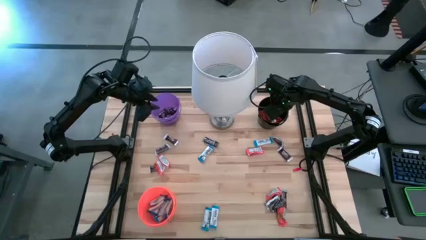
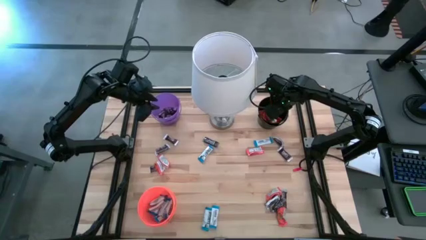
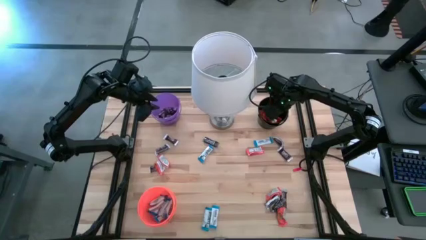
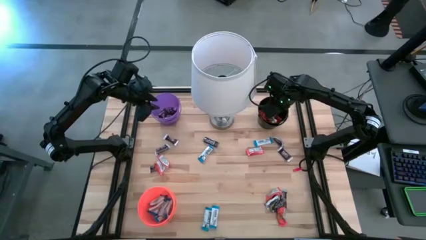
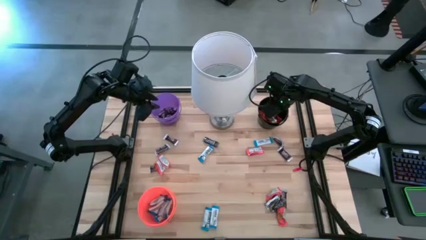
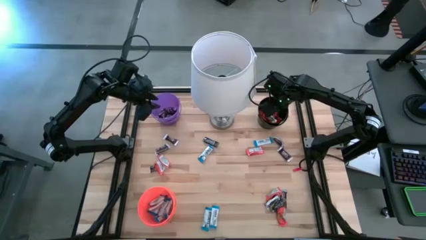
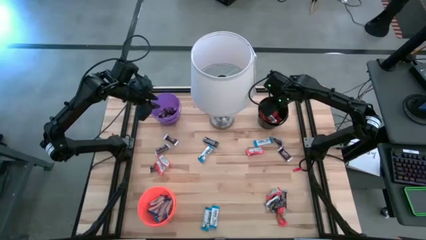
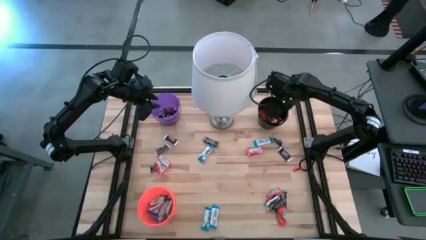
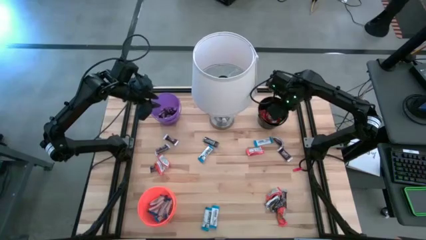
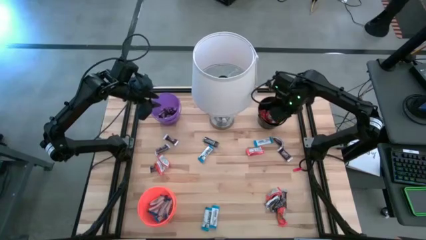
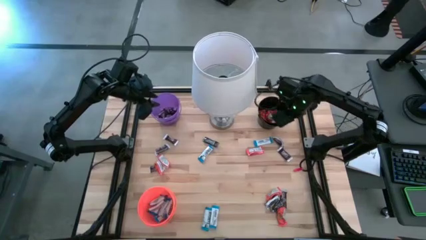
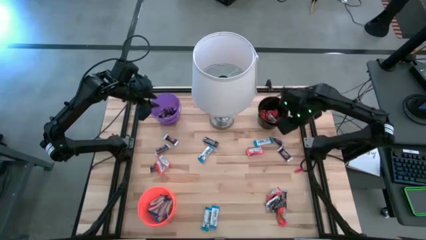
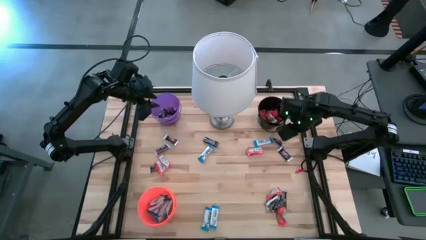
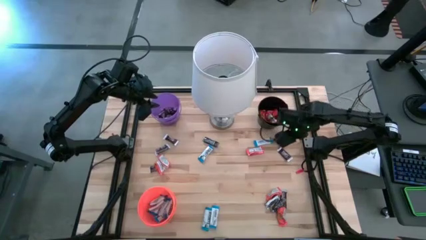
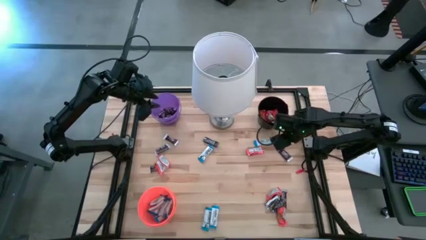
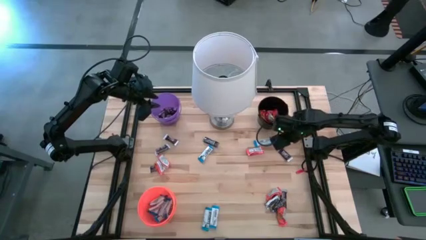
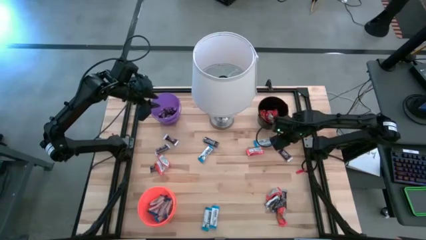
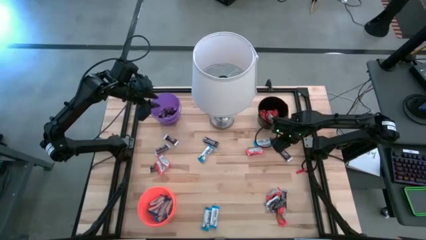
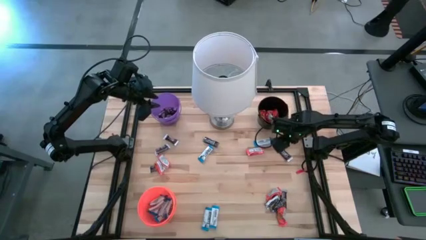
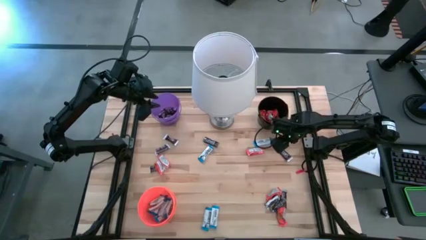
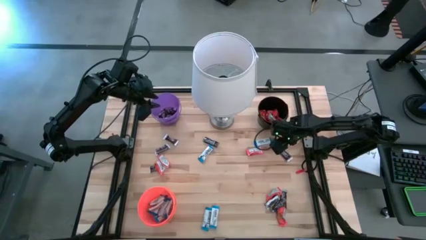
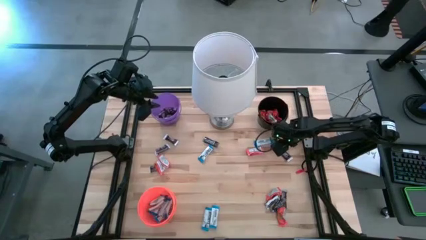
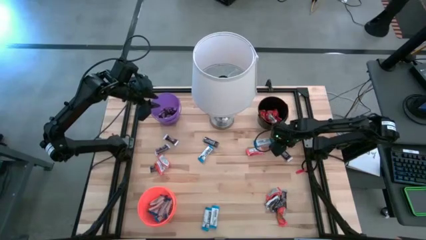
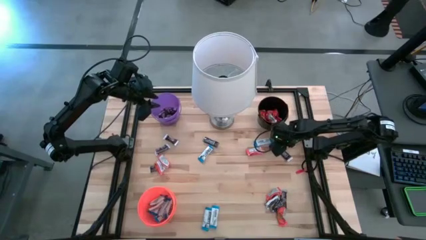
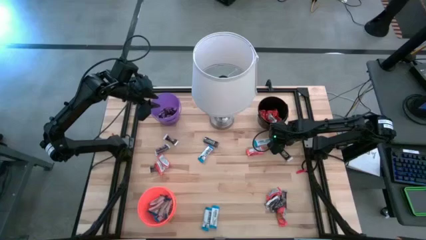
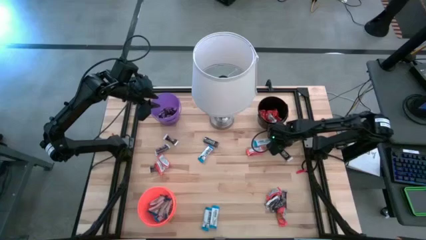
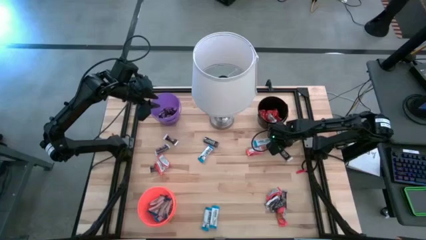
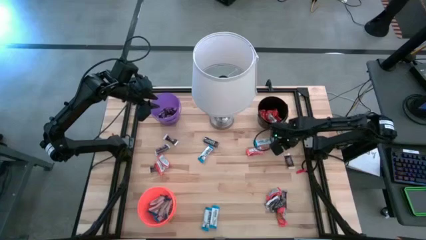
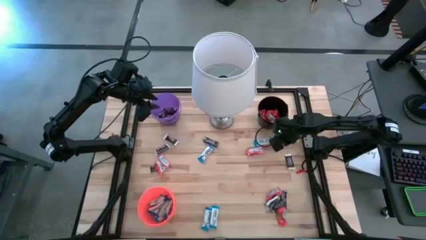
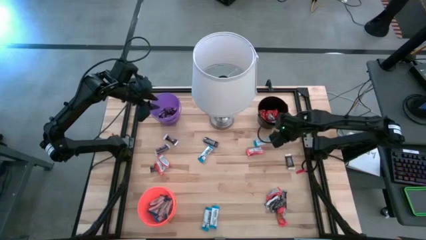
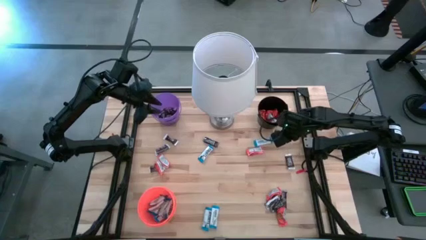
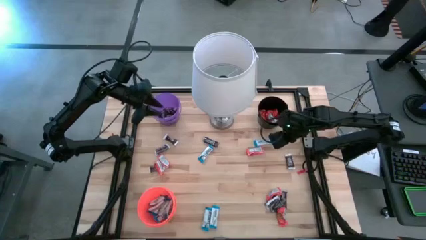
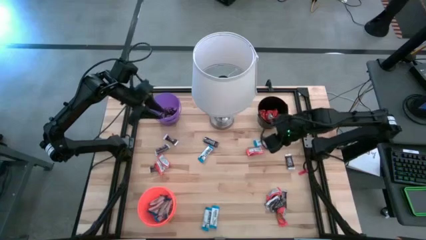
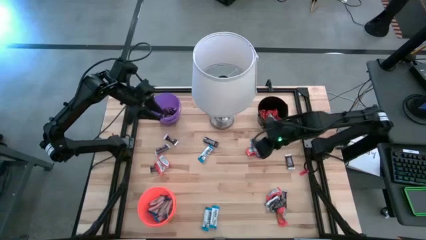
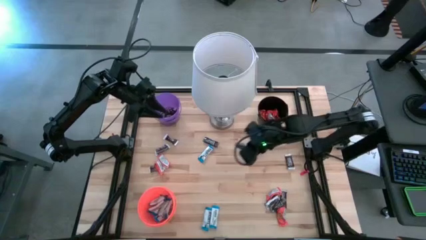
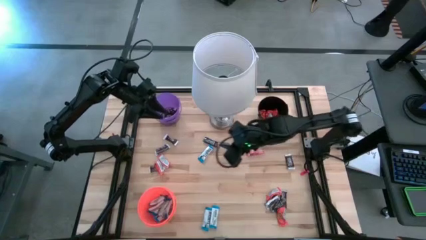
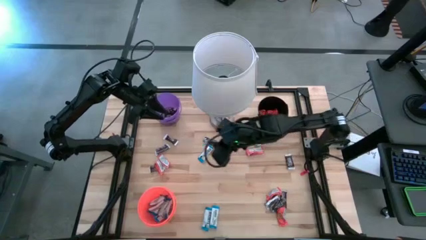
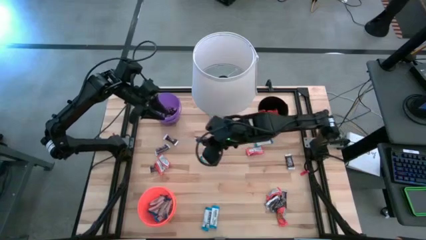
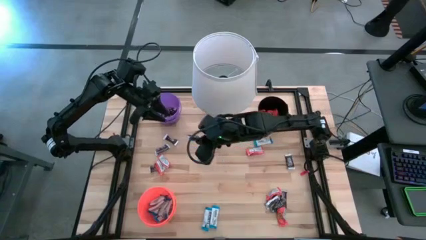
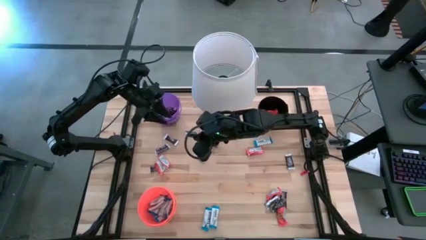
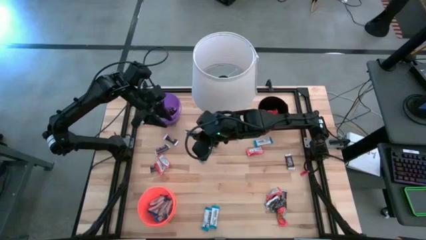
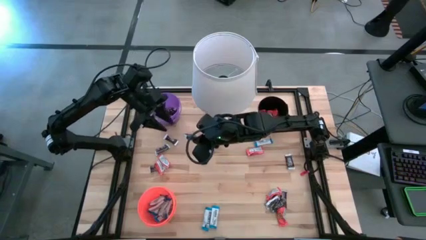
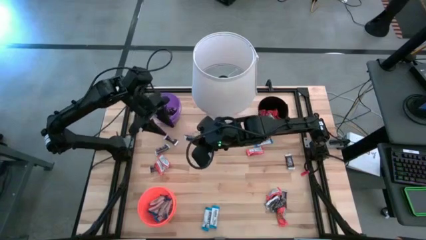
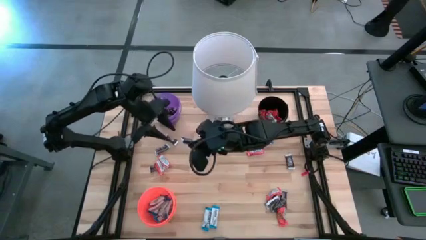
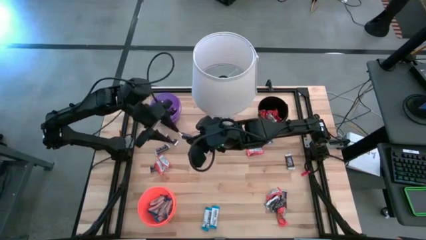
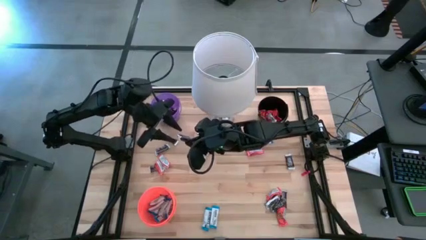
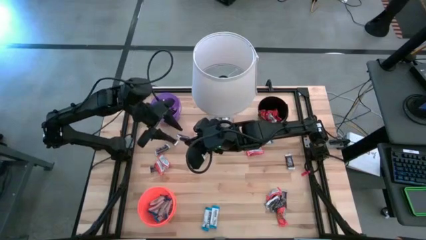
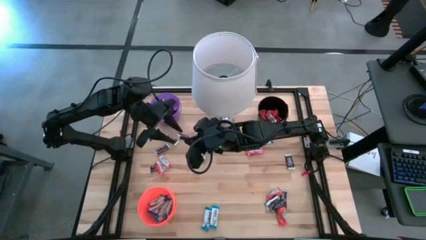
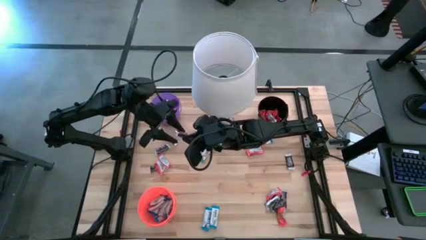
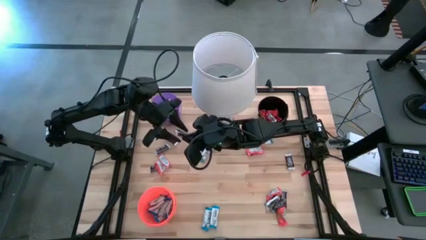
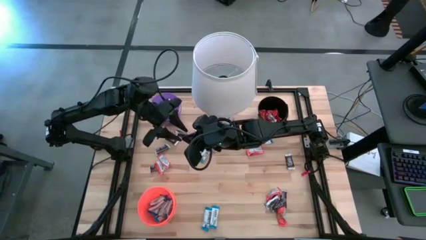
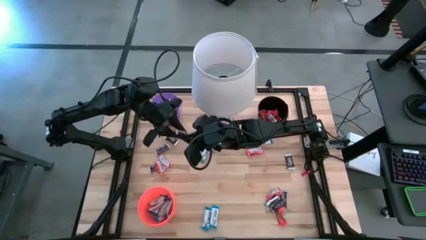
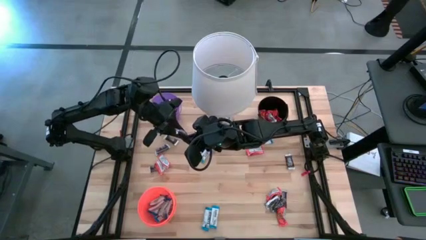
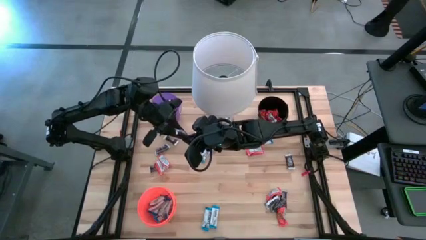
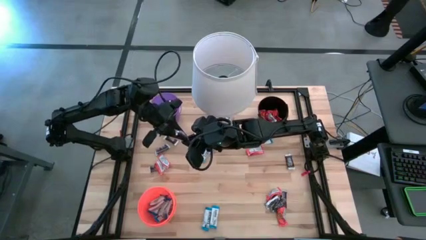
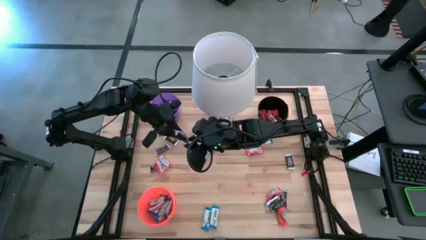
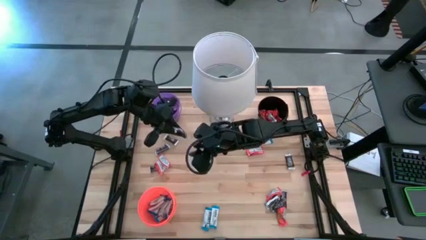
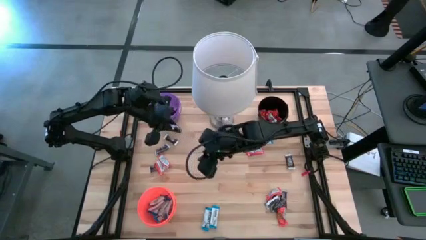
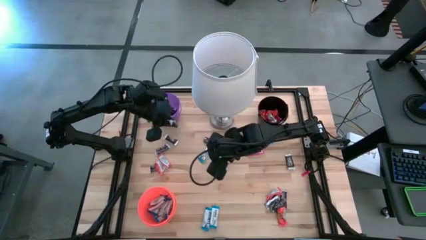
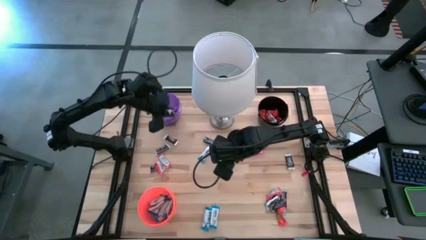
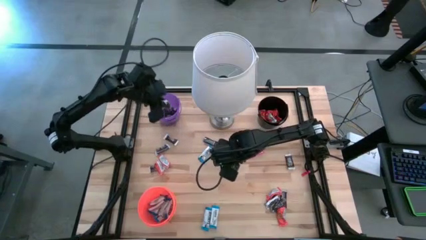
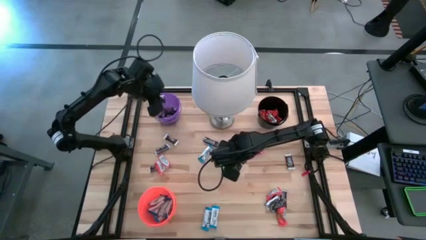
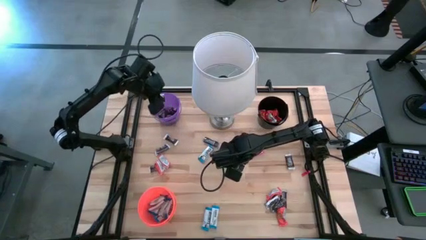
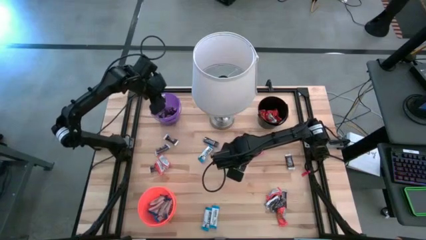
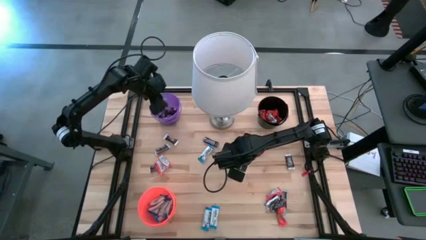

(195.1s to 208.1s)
Task: Organize candy in baskets
Put the brown chocolate bar into the purple bucket

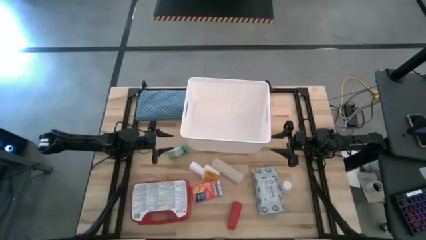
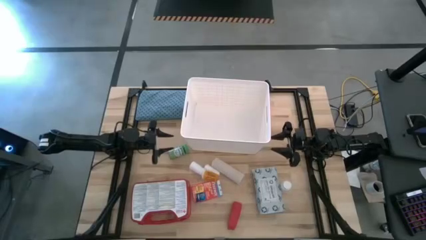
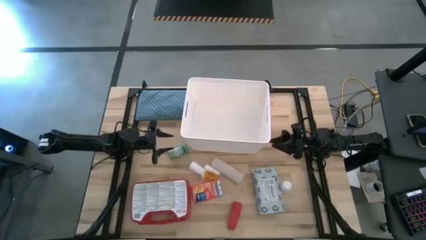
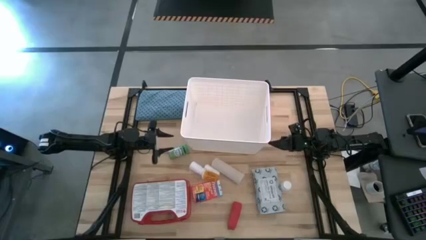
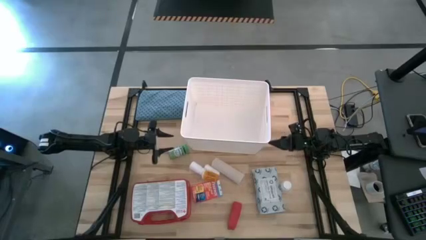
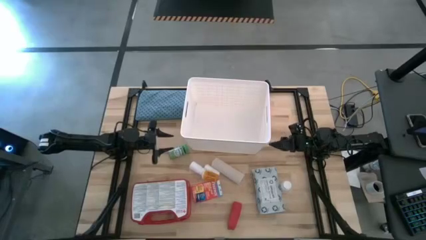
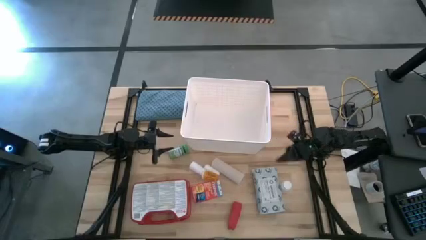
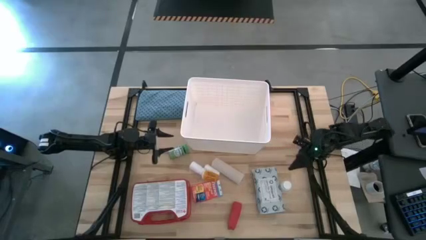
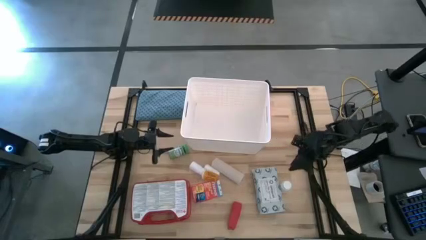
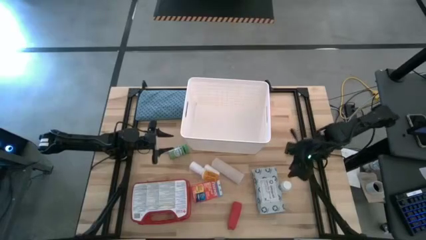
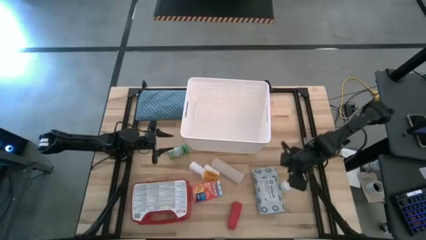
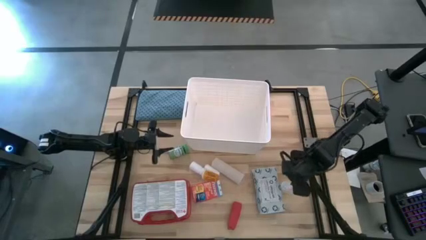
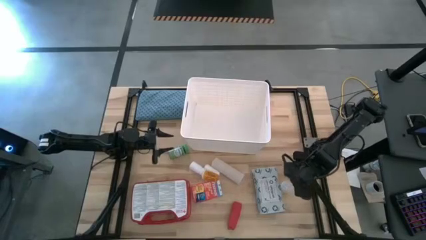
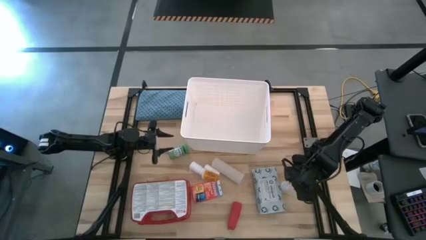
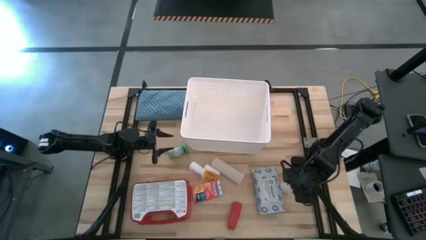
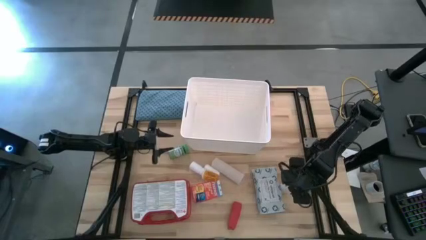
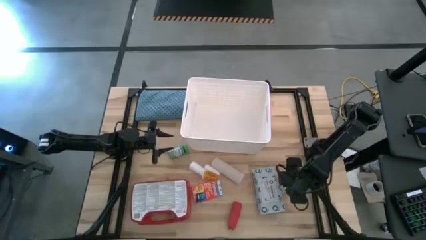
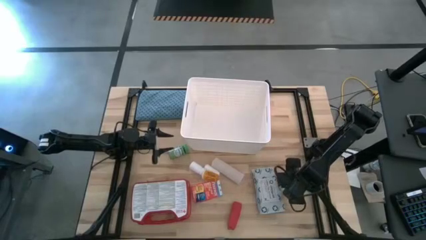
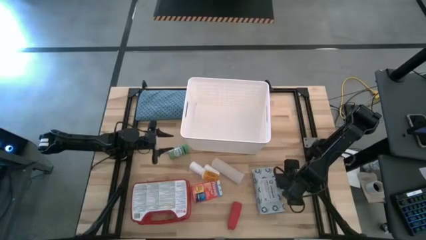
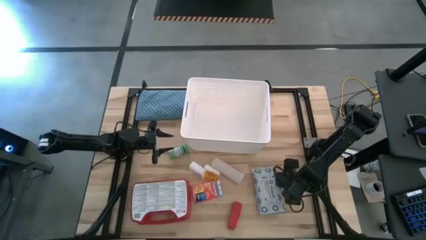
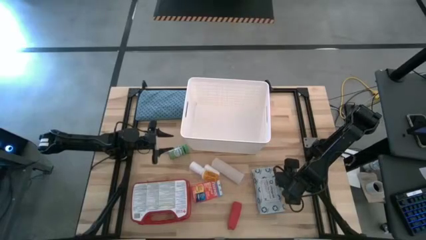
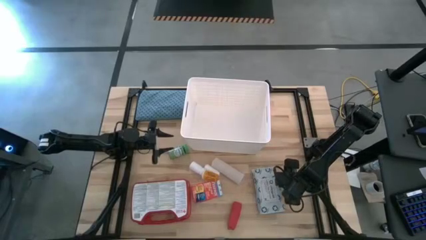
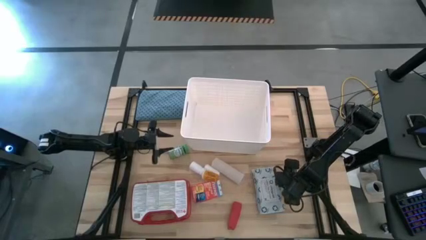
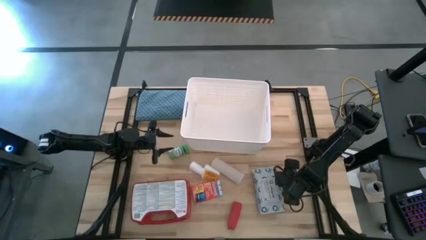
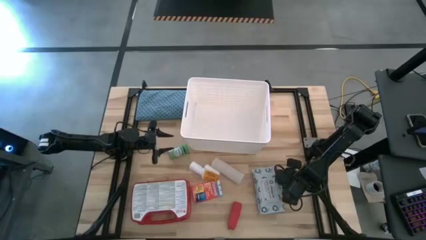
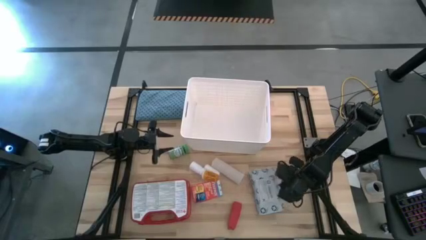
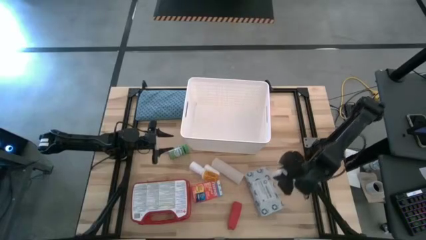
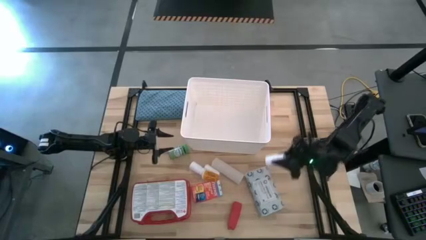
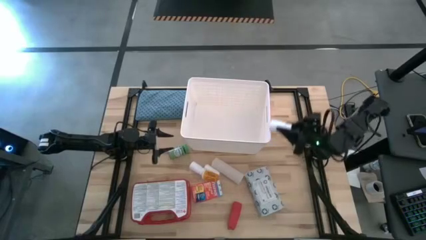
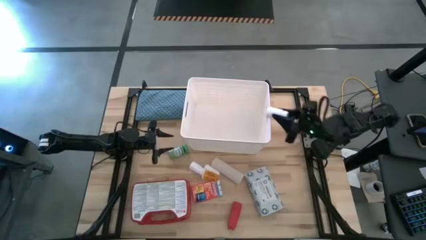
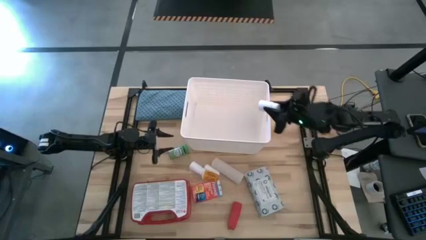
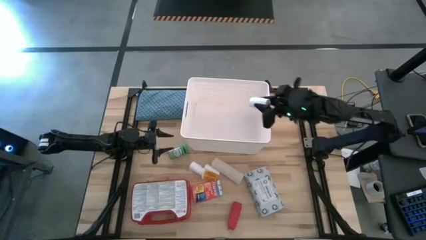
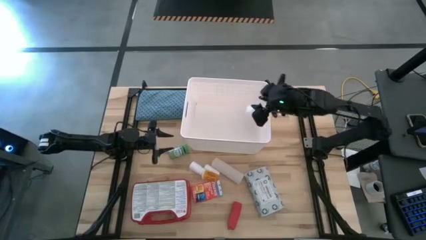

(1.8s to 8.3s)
Task: Pick & place medical supplies in basket/bin
Put the right white medicine bottle into the white bin
